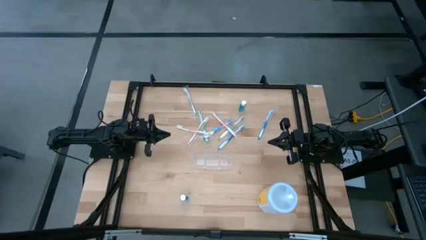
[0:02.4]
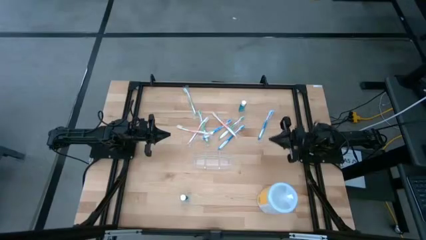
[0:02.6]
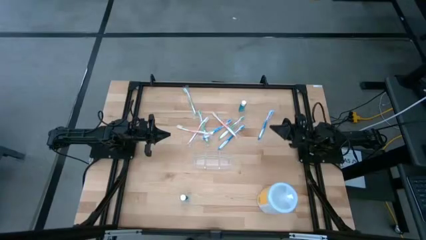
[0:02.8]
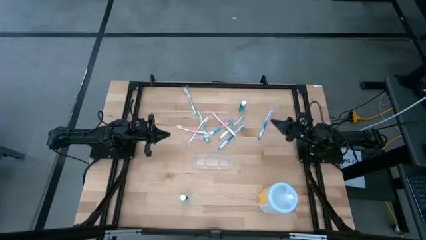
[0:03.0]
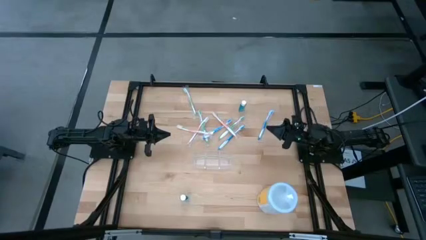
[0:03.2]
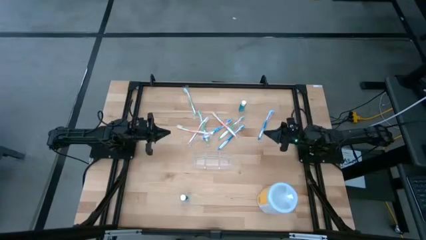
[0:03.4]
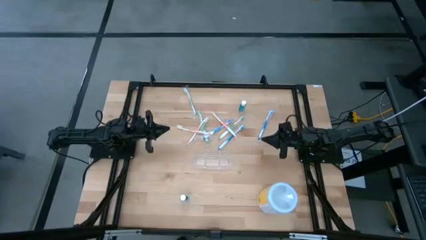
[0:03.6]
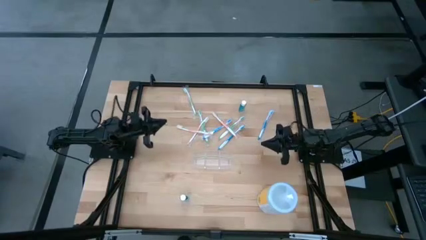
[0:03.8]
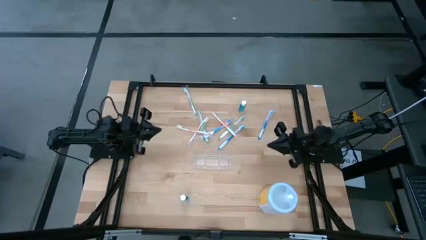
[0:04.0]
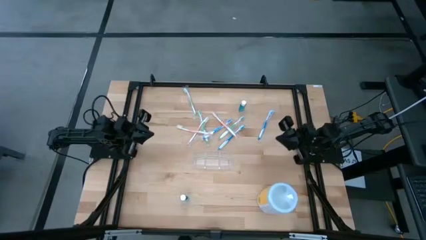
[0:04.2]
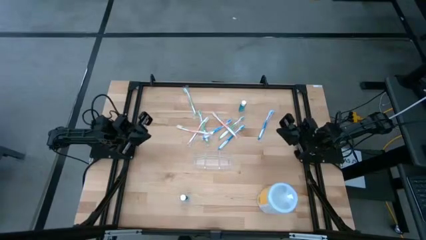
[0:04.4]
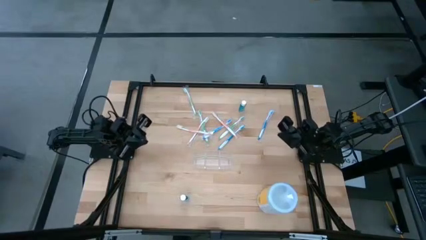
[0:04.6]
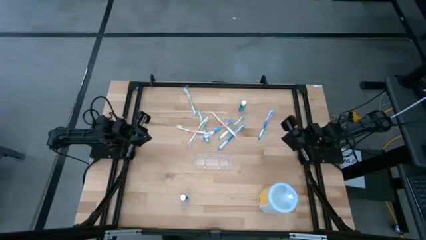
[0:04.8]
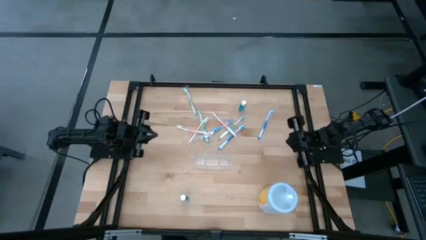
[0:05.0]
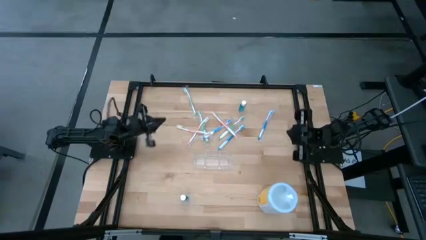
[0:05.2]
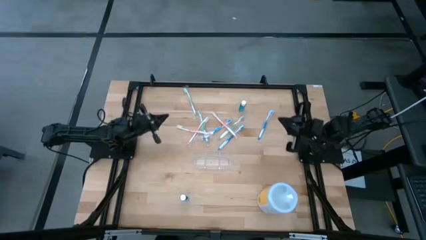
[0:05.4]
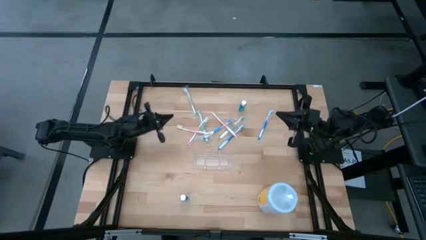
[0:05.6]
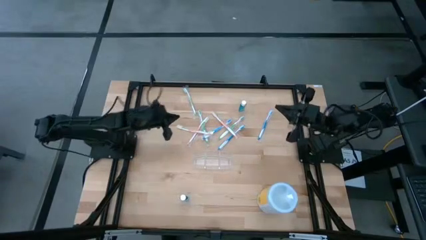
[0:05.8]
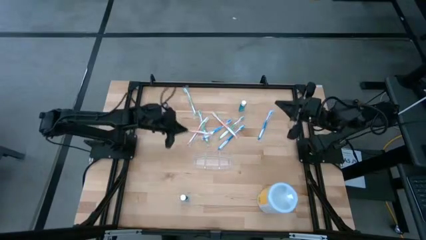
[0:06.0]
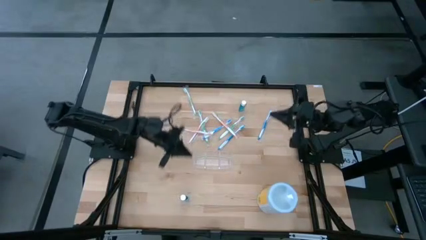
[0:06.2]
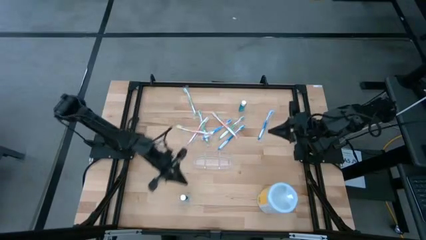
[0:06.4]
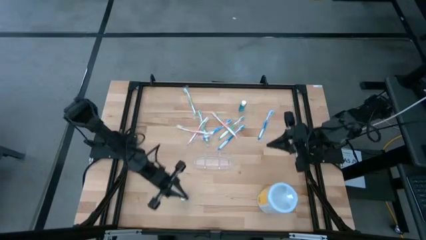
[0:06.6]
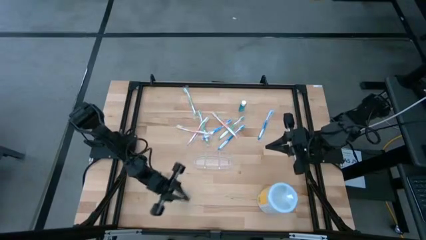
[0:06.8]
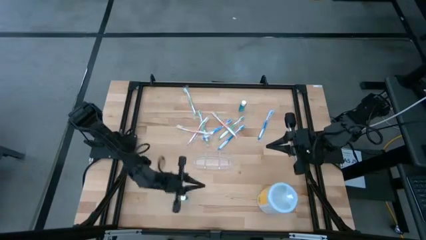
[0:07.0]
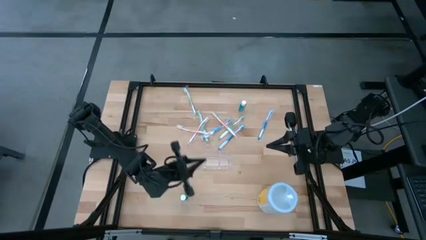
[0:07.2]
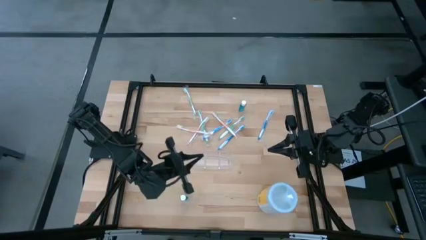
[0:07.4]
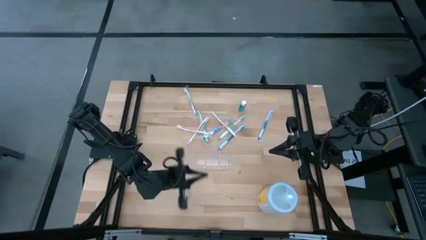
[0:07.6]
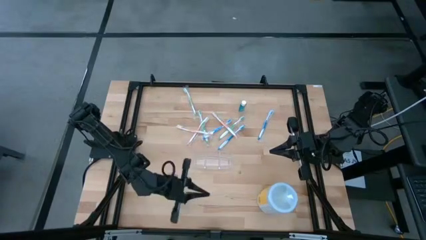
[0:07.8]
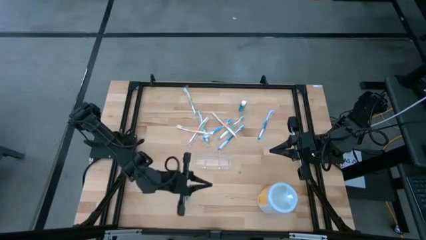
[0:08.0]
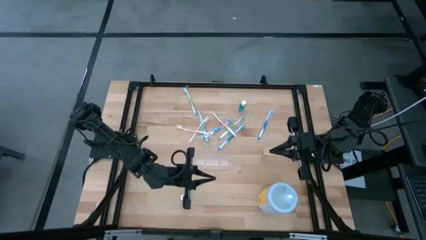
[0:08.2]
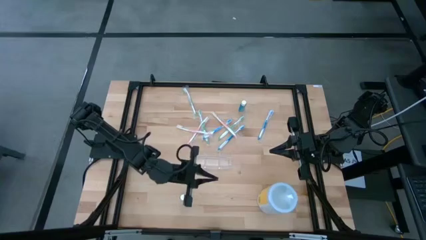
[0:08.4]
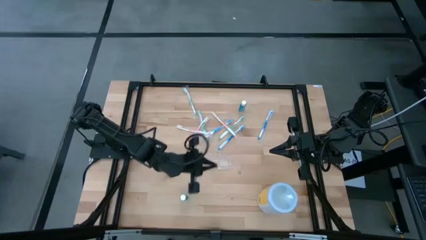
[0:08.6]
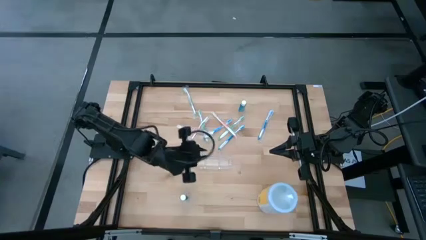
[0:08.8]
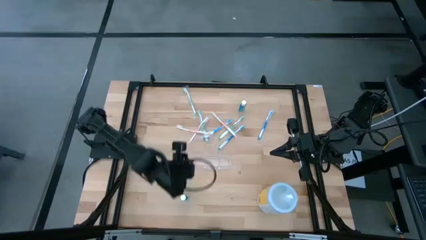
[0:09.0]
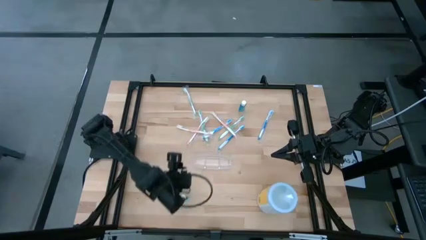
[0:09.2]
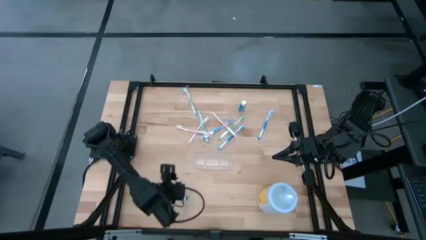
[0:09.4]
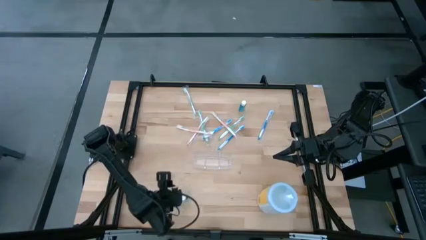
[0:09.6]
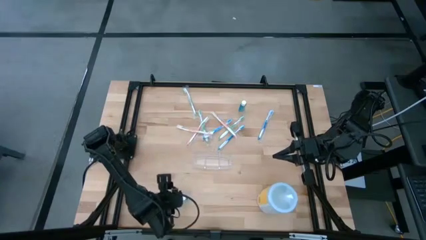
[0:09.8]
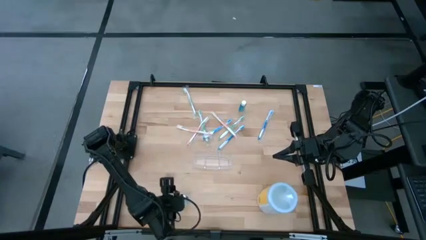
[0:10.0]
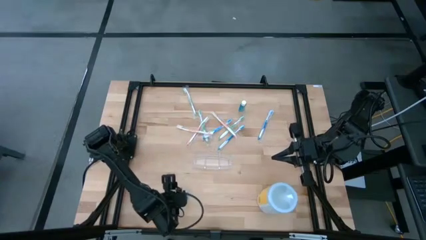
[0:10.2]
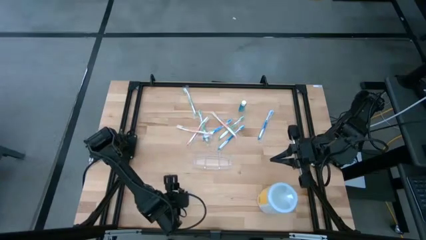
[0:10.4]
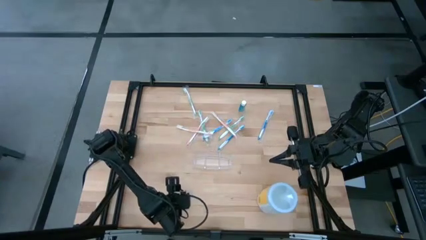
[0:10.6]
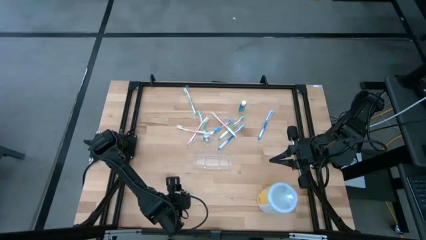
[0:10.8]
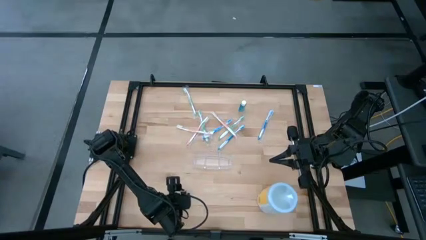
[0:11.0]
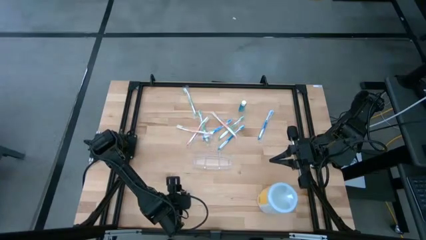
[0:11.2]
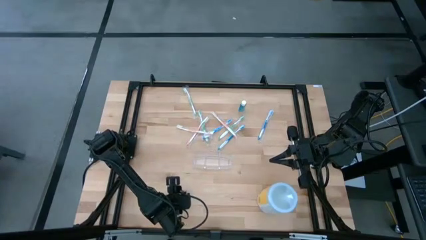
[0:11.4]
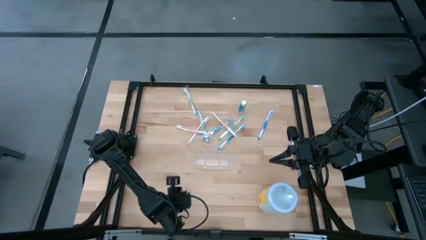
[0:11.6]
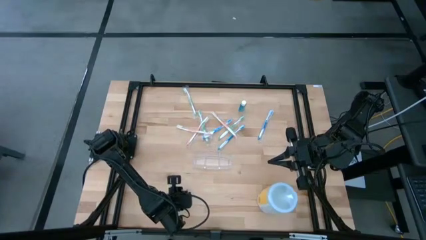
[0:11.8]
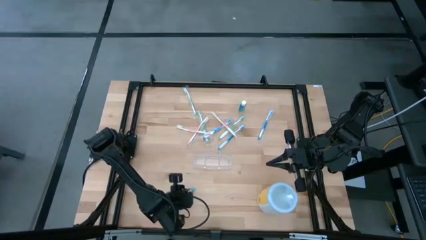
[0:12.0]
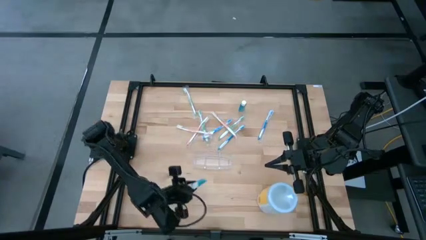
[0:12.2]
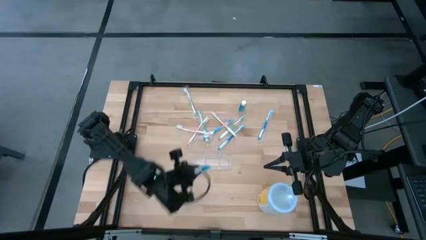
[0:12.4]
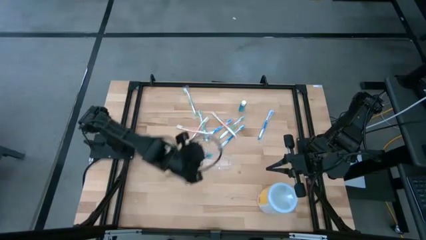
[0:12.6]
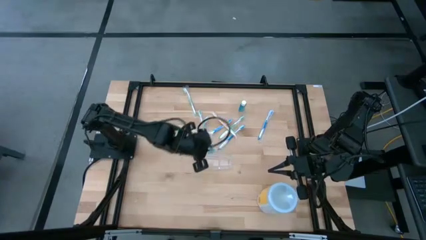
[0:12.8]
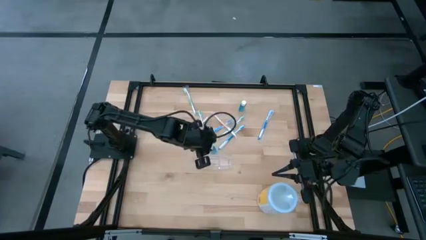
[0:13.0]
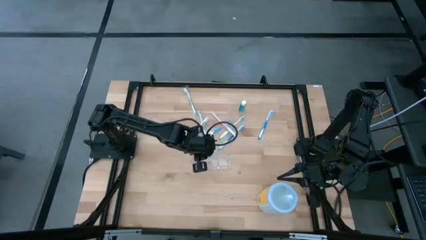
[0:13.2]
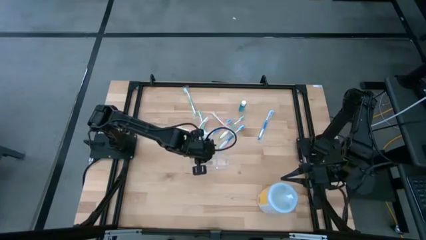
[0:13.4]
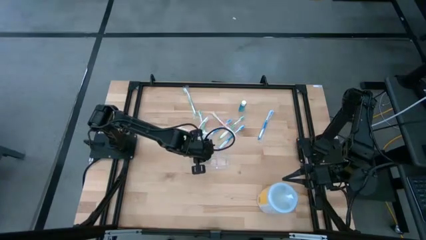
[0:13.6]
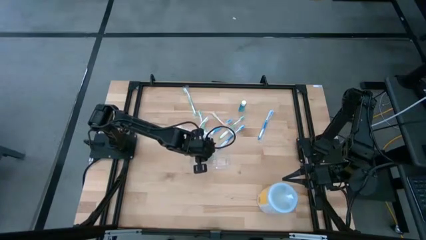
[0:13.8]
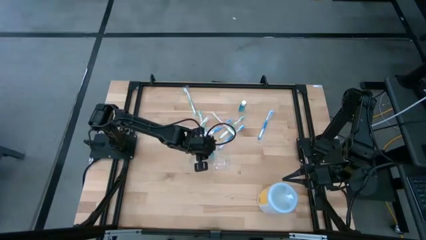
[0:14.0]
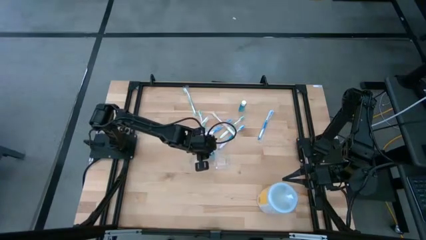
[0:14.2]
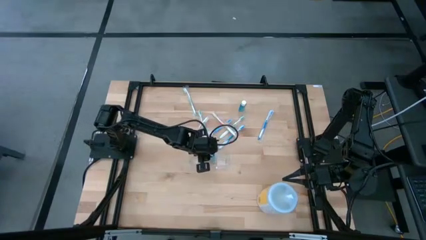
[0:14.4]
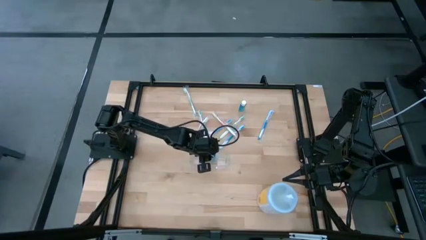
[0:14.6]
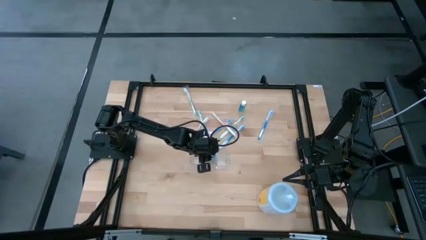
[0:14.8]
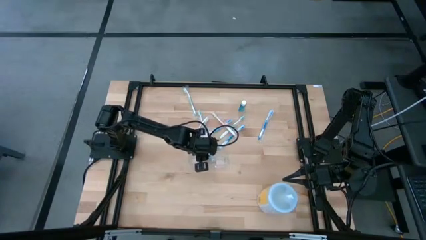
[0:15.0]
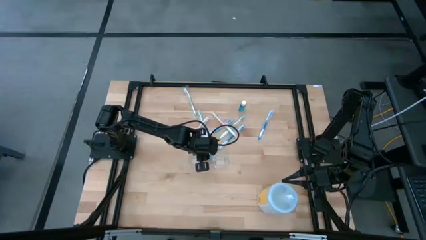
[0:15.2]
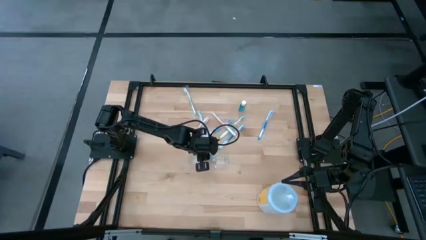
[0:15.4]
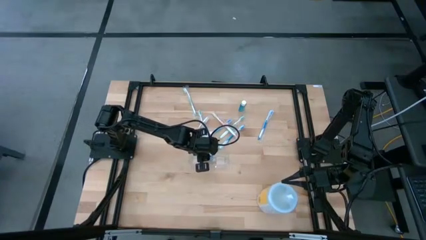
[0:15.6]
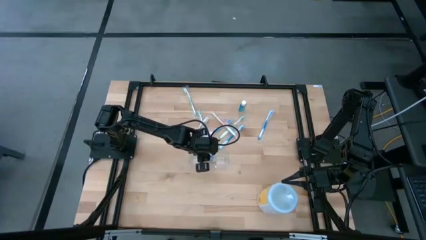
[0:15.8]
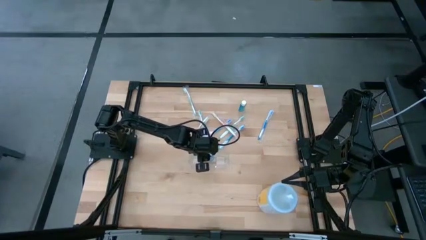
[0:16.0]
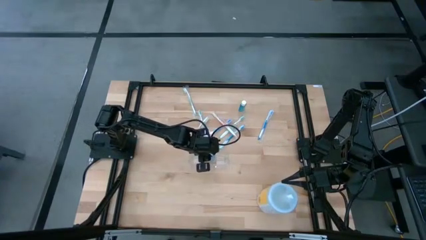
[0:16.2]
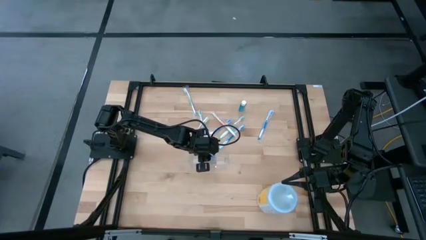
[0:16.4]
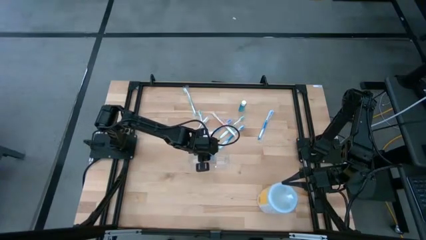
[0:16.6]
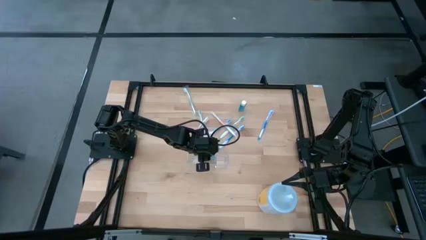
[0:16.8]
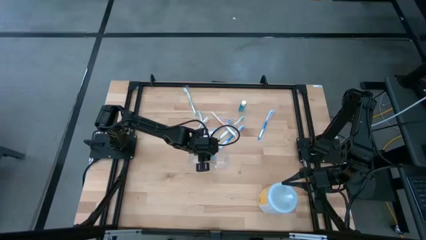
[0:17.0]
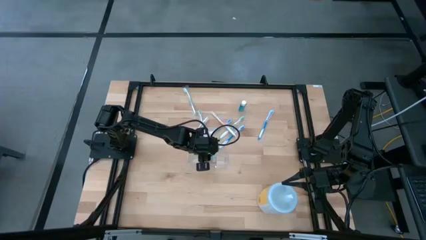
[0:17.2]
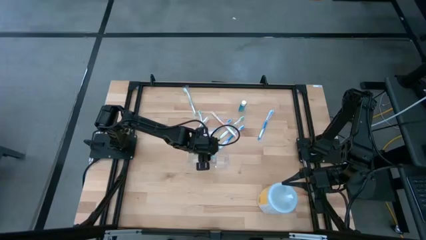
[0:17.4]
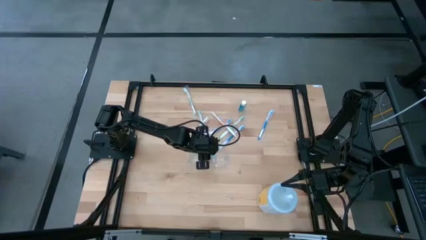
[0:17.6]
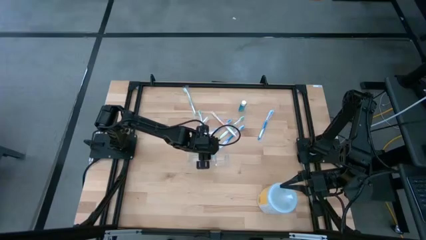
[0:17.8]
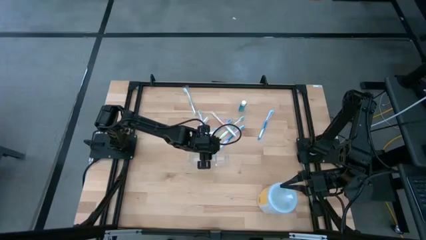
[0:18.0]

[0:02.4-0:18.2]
Task: Pick & Place toothbrushing station
Put the blue mouthwash into the transparent organizer
